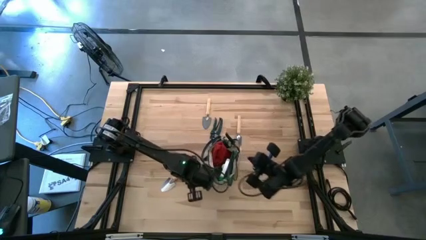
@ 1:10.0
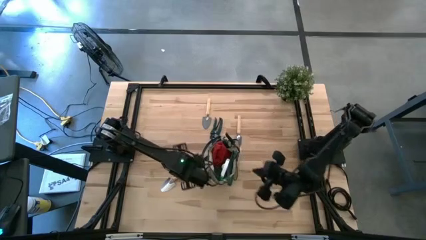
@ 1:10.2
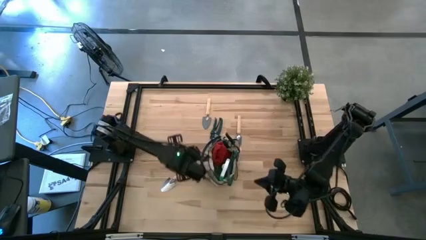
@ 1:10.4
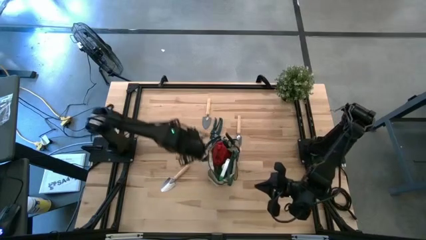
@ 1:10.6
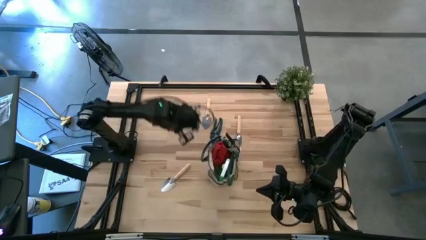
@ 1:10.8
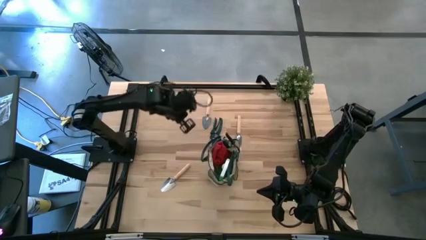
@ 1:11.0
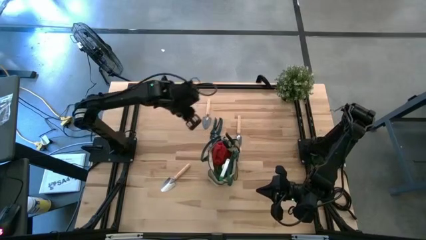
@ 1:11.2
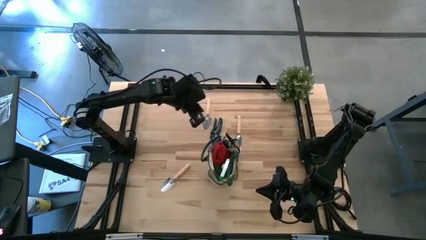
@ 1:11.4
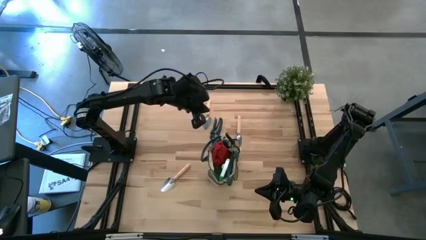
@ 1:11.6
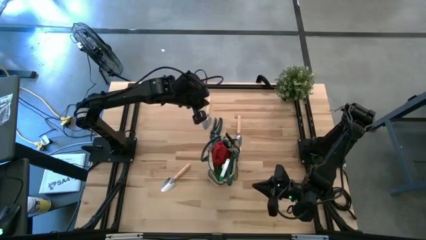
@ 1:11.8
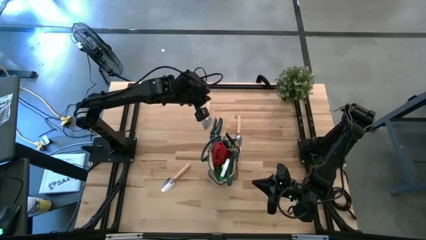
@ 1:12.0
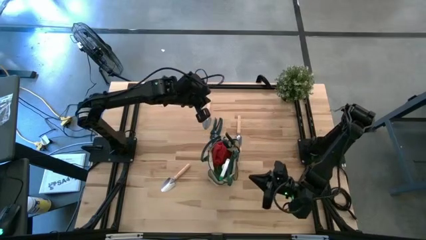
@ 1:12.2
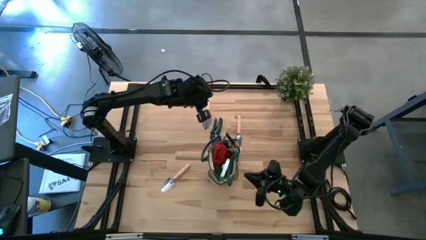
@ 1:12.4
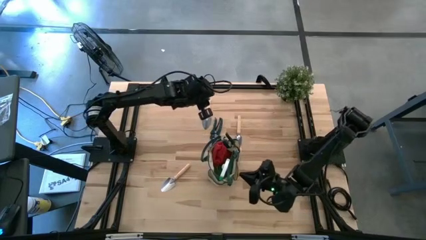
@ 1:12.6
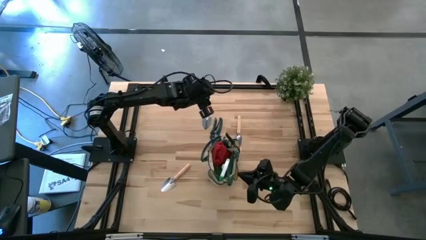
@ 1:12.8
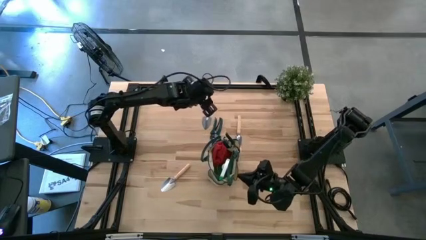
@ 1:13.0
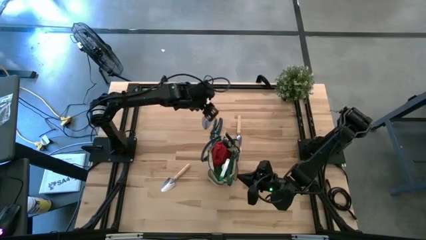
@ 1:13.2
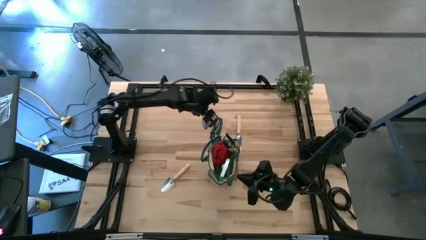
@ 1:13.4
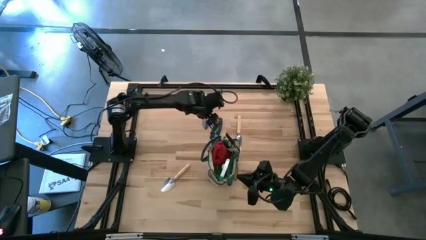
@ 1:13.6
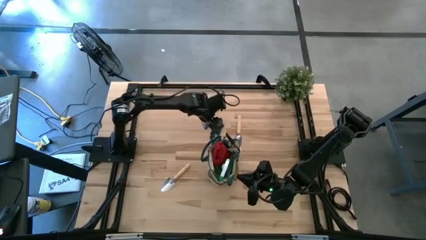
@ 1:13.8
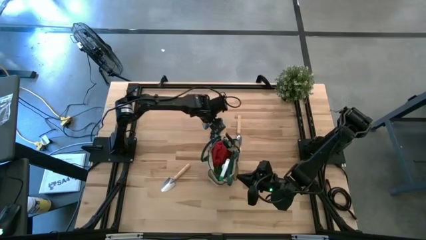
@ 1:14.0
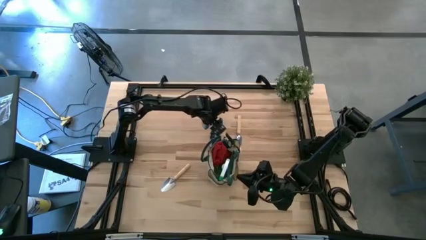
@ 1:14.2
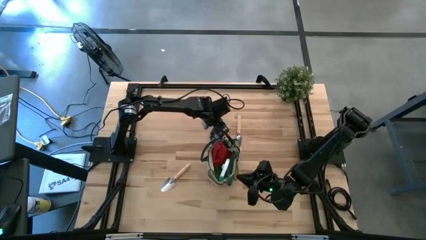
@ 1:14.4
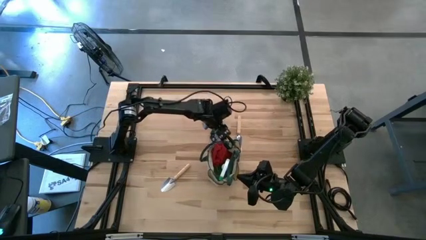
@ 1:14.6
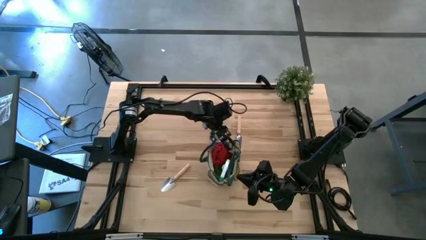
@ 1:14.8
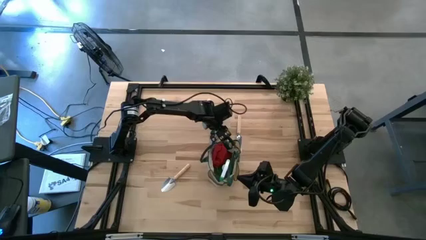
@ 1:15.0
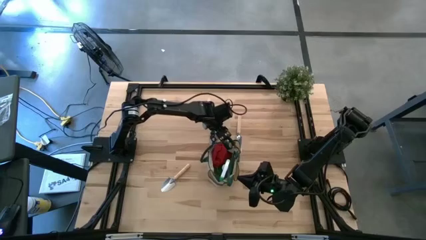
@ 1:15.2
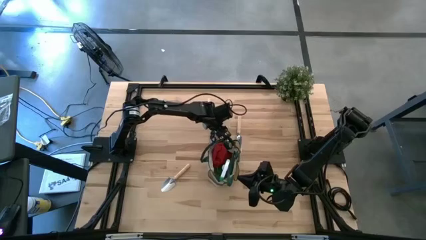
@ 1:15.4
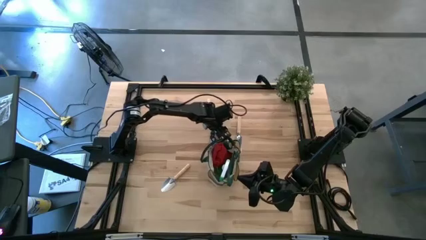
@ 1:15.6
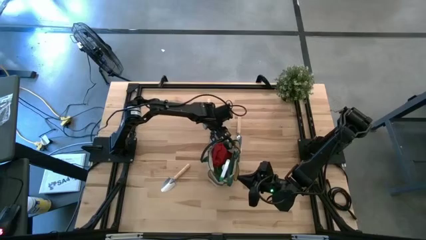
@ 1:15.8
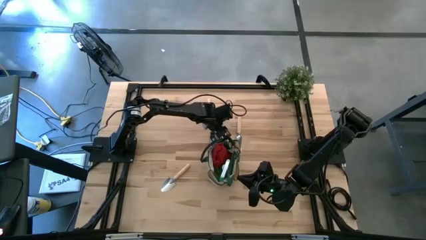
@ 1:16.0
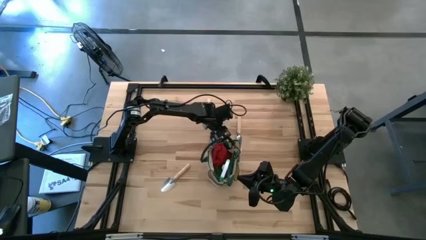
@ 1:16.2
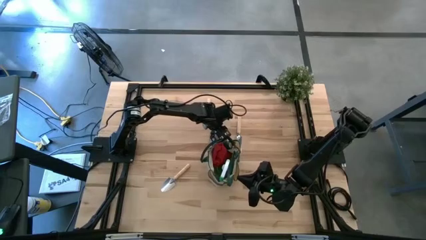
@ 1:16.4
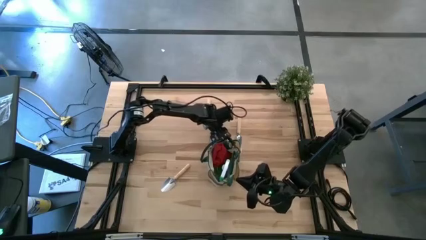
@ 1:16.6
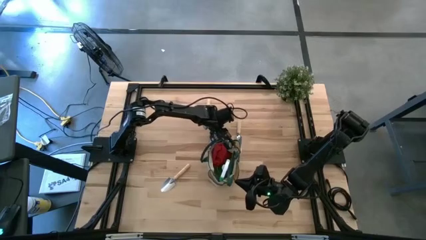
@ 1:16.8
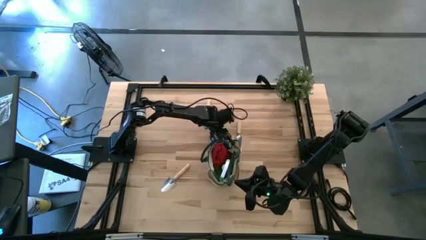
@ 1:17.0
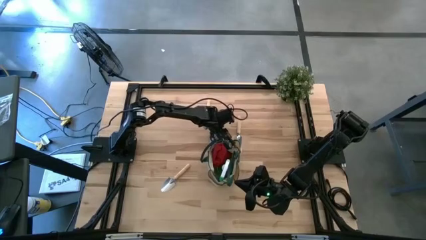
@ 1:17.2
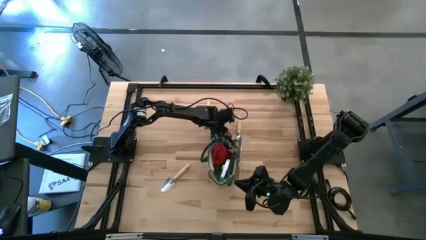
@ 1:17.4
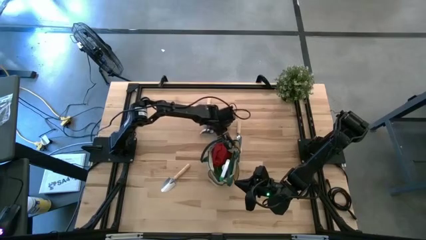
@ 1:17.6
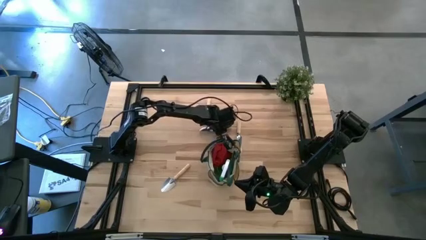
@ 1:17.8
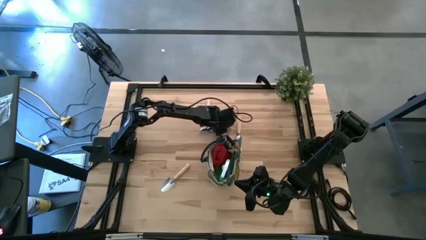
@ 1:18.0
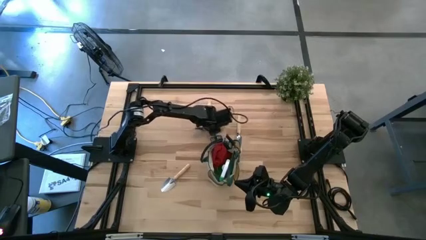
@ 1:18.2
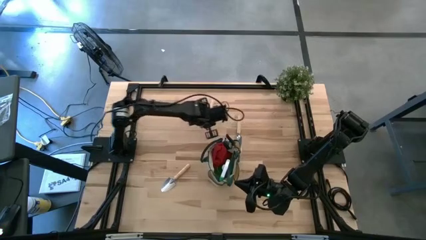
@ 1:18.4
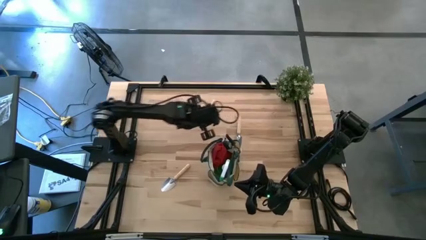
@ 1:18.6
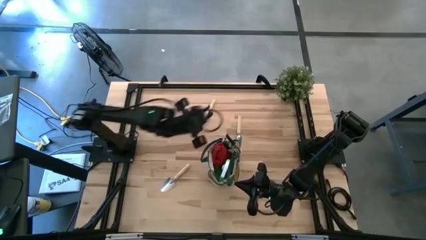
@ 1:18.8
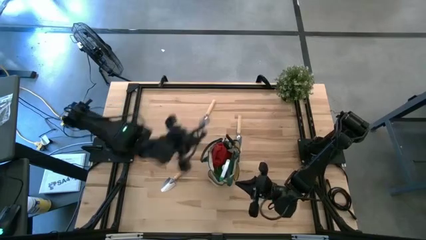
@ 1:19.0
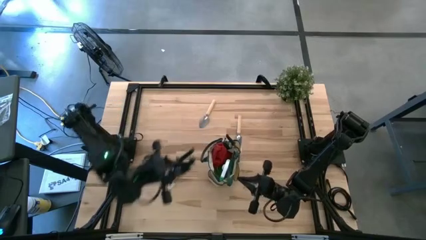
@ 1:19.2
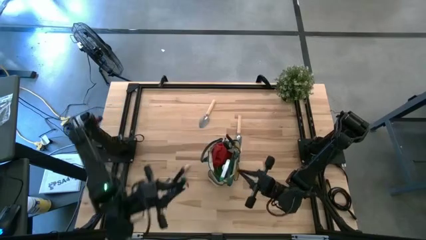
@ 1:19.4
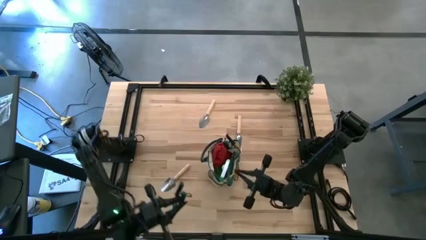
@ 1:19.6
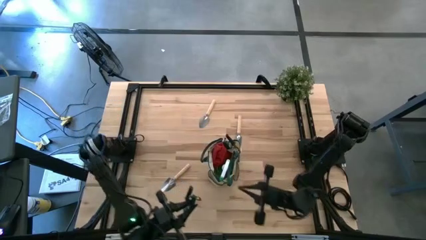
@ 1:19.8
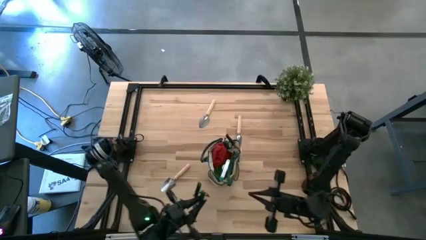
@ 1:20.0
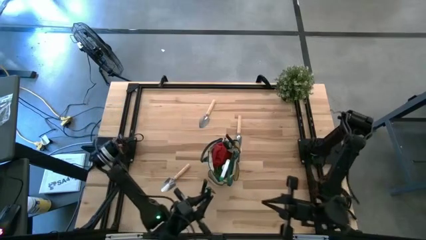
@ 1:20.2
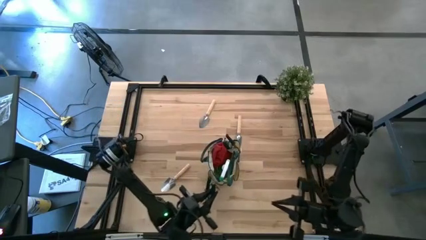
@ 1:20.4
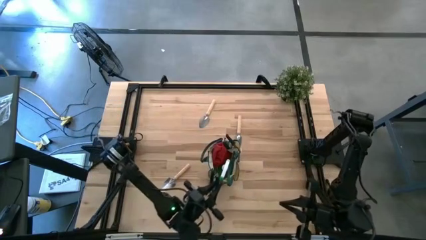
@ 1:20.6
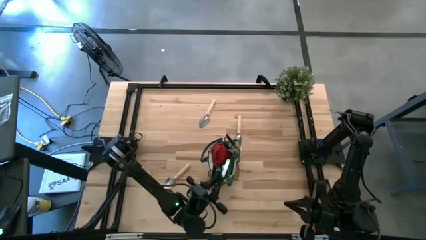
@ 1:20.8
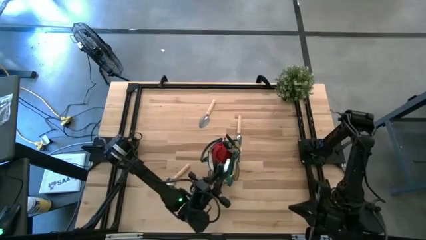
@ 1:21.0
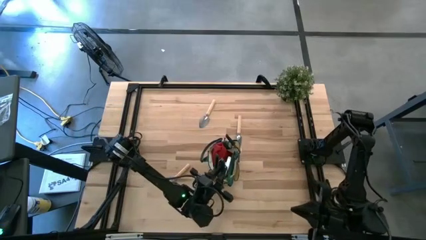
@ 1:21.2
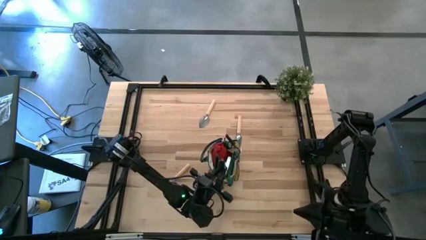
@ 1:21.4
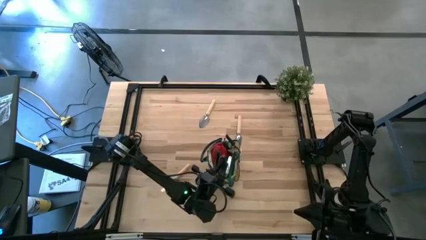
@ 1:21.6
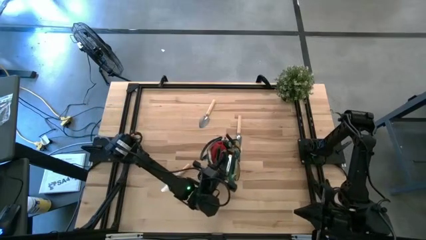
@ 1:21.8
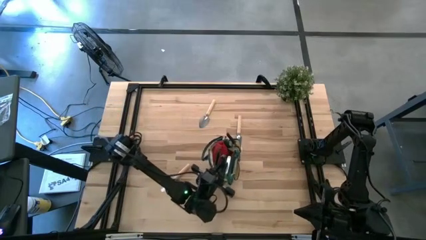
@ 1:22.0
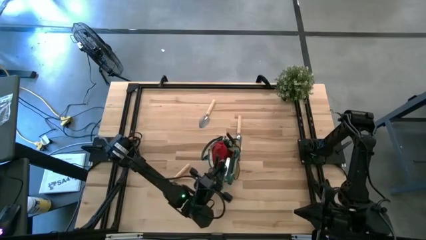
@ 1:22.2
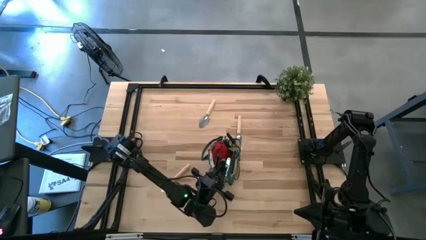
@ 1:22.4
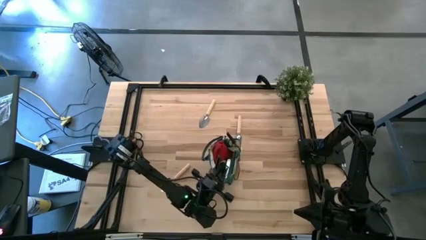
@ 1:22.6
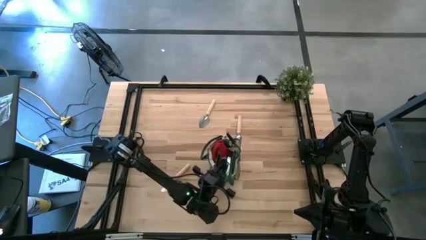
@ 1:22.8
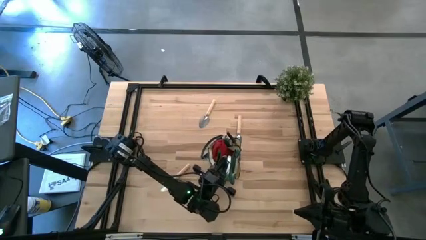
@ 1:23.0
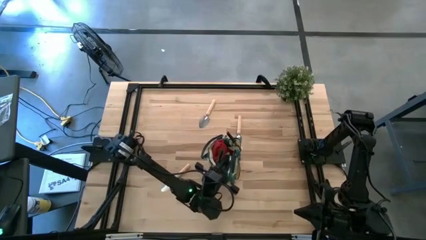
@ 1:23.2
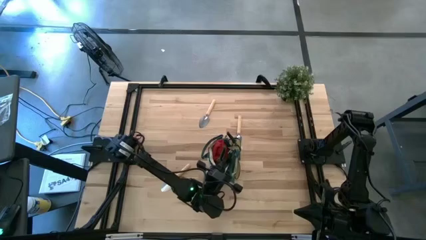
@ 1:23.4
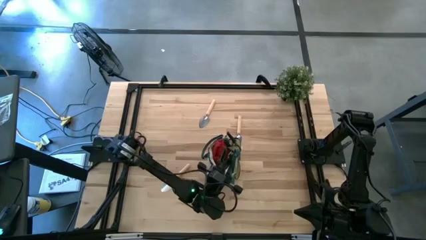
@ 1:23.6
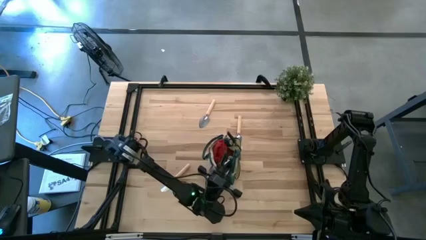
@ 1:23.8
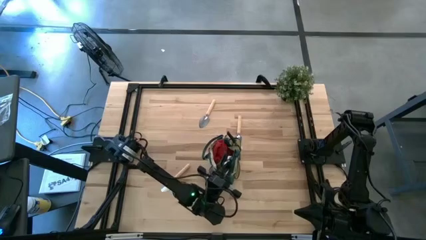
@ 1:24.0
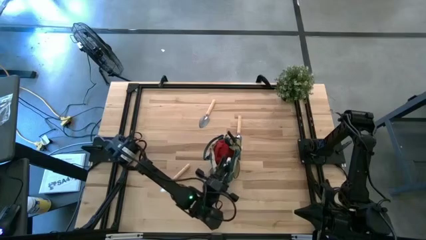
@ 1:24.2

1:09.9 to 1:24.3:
Task: Pick & Place Garden tools in Gardening bag
Put the shear scissors into the gardening bag
